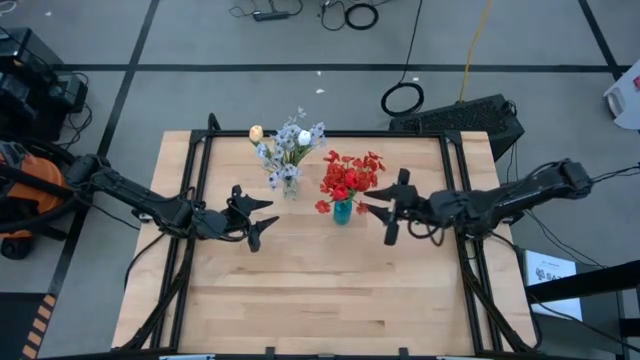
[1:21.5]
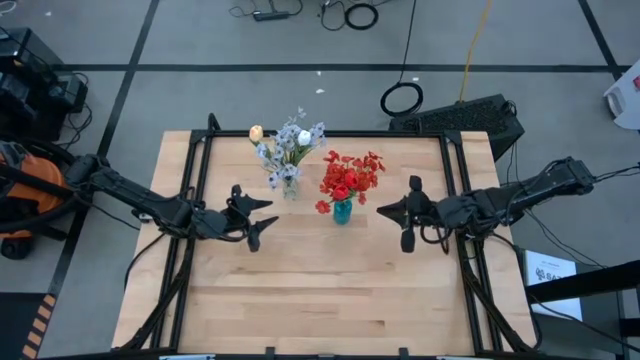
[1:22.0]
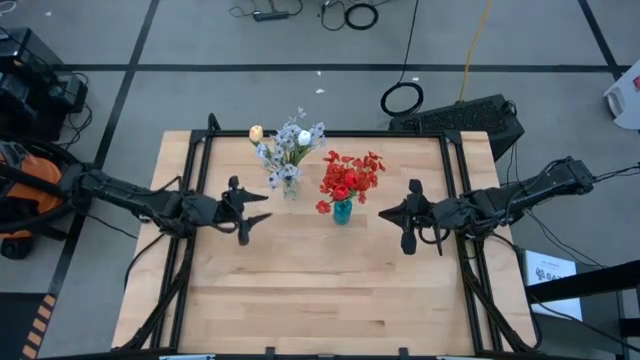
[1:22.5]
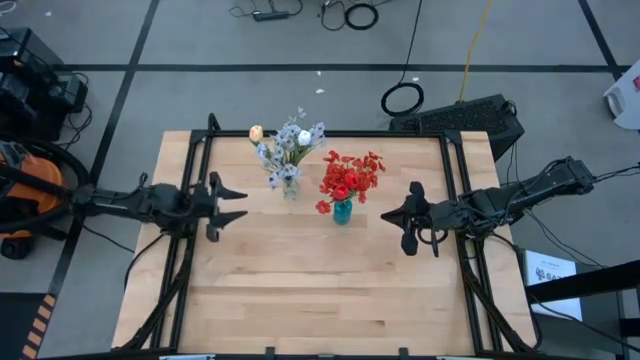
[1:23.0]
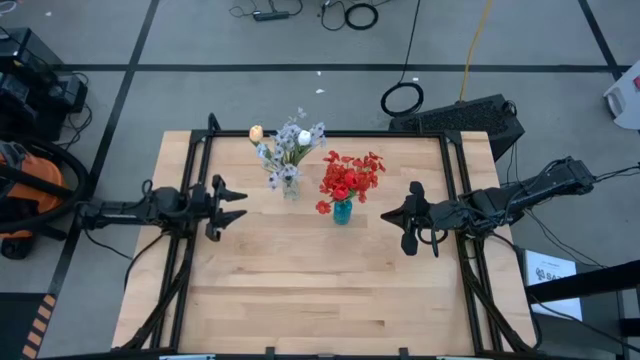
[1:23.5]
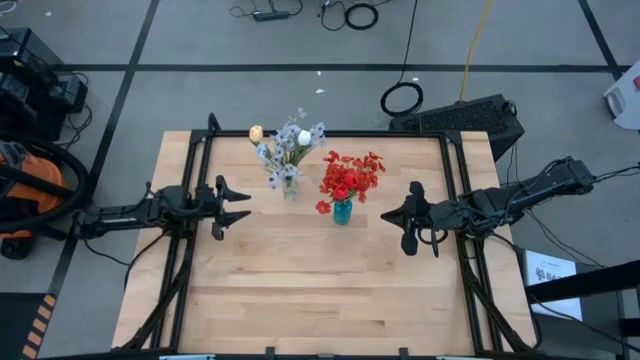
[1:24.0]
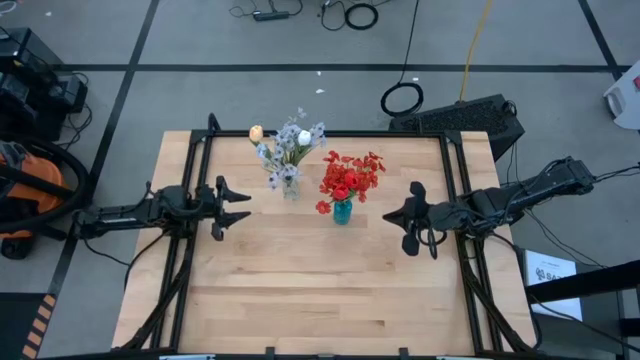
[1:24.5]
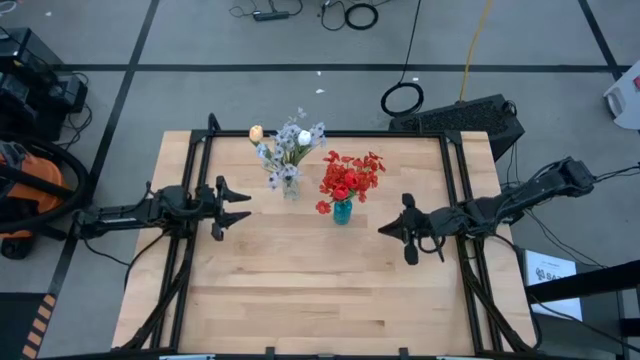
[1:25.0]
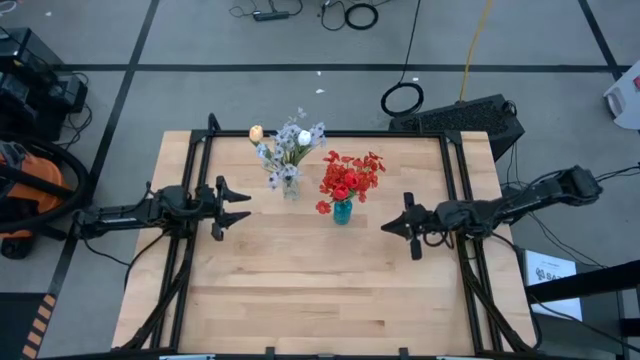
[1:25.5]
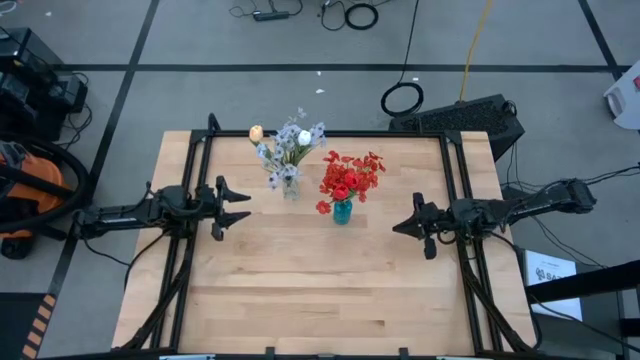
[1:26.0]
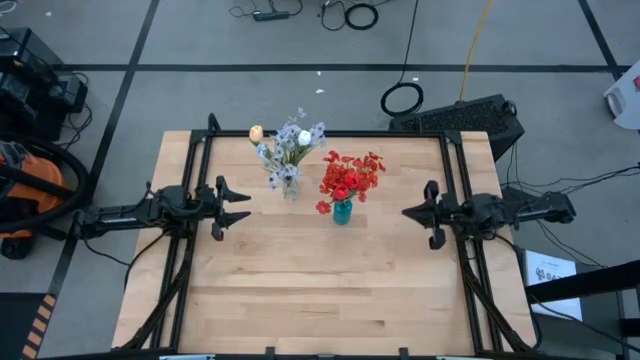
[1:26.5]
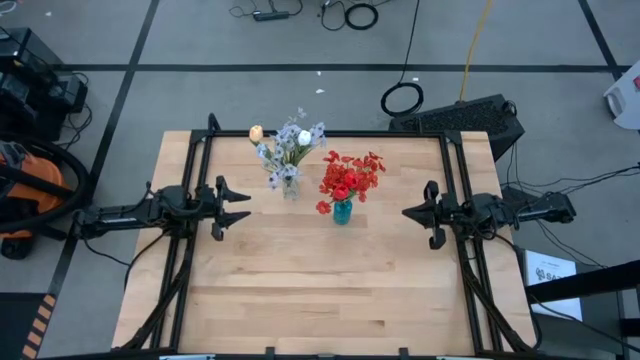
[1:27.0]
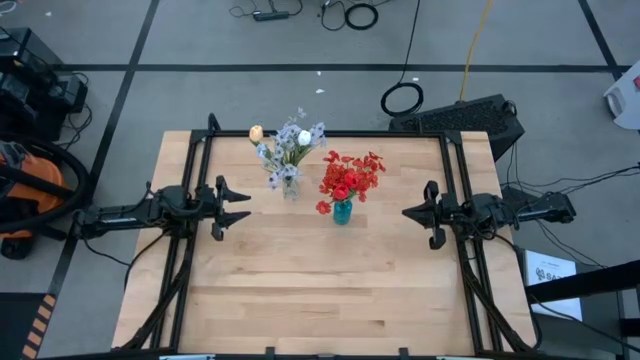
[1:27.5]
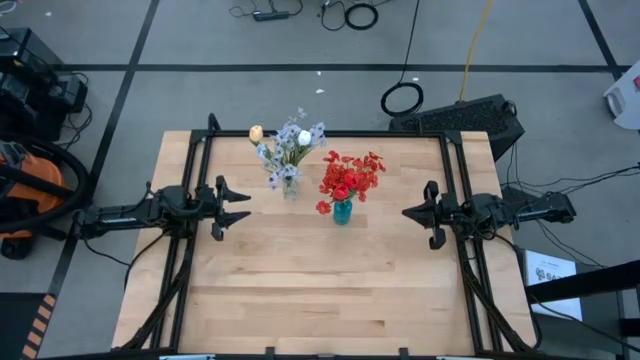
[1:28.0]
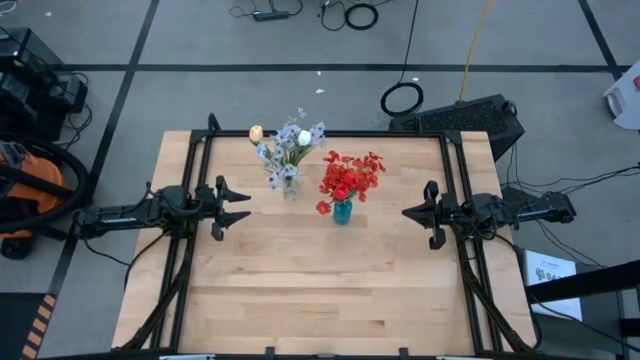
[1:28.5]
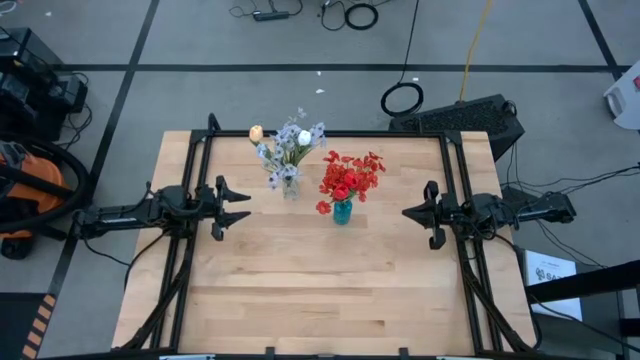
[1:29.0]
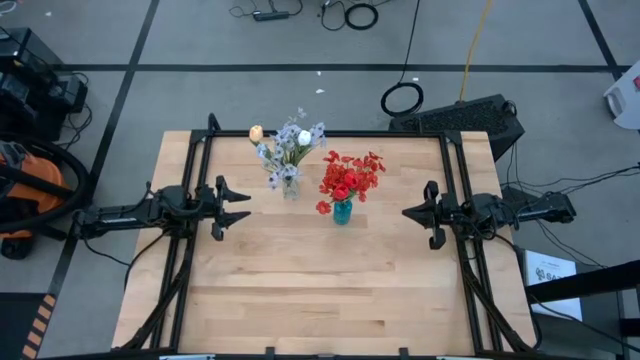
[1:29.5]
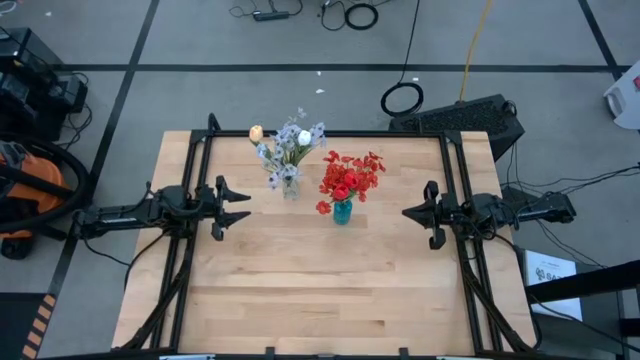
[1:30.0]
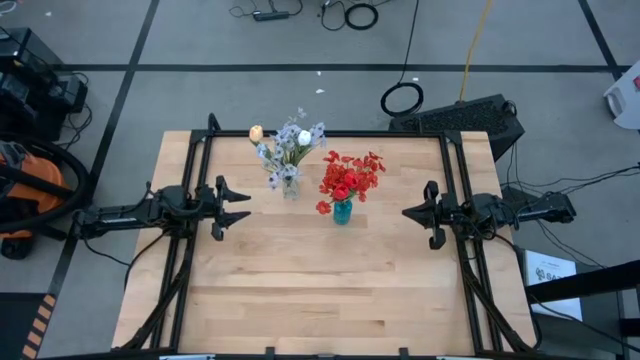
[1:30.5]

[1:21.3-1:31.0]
Task: Sort flowers into vase by color
Return to Home Position

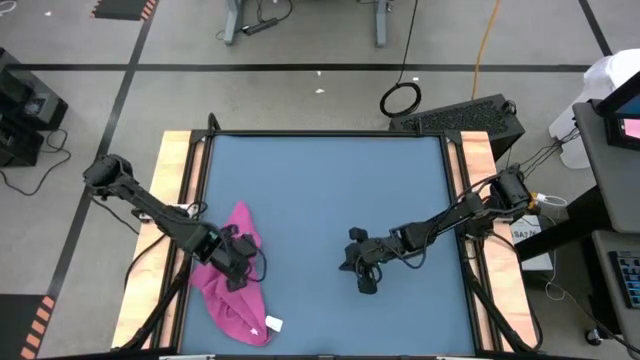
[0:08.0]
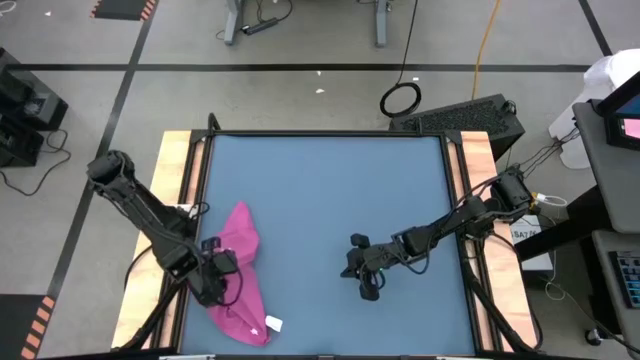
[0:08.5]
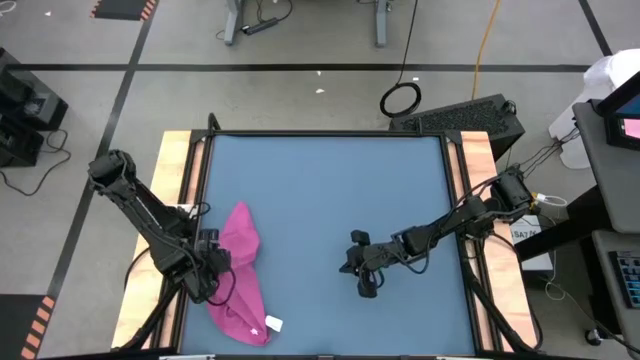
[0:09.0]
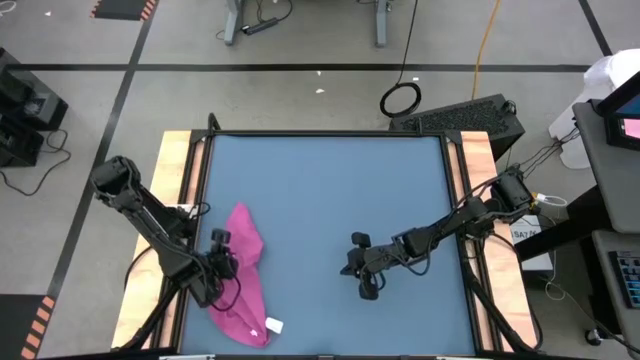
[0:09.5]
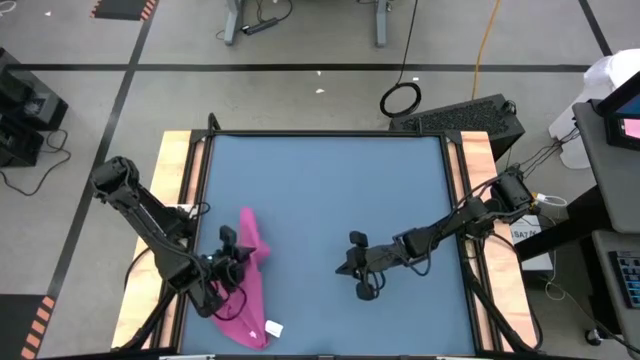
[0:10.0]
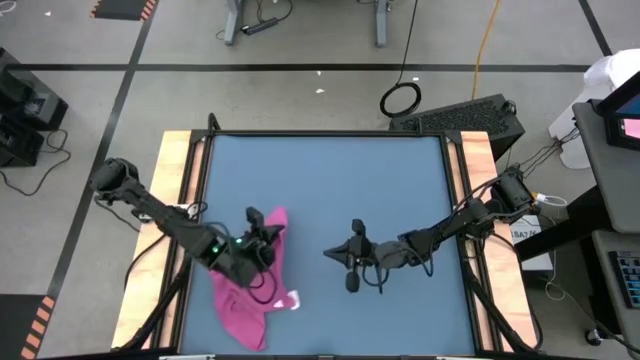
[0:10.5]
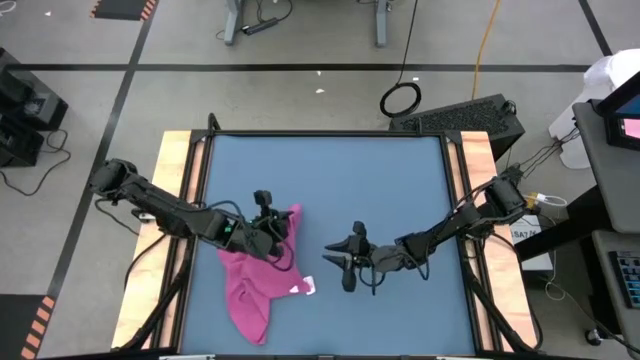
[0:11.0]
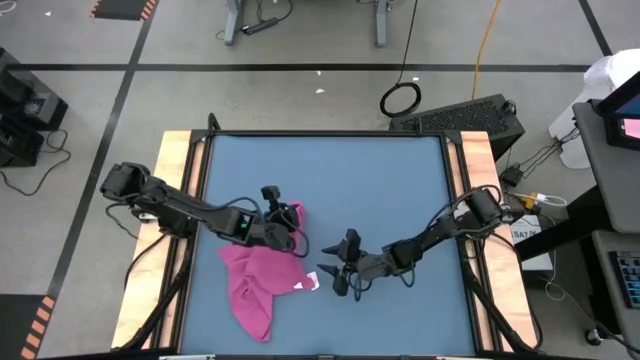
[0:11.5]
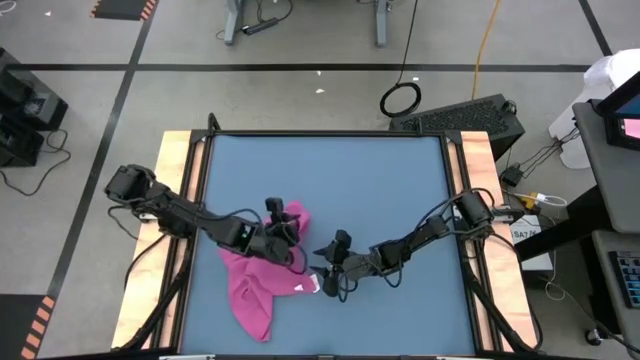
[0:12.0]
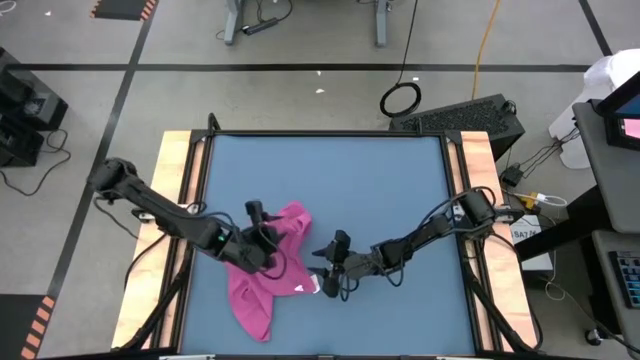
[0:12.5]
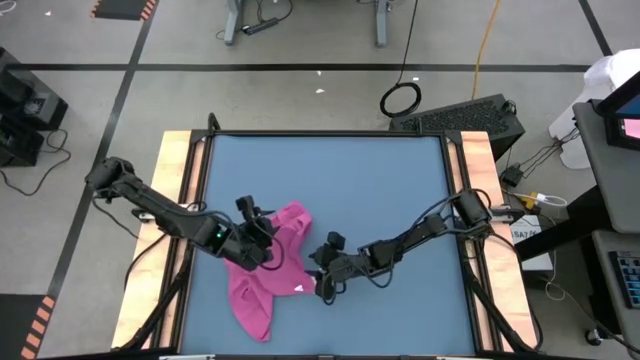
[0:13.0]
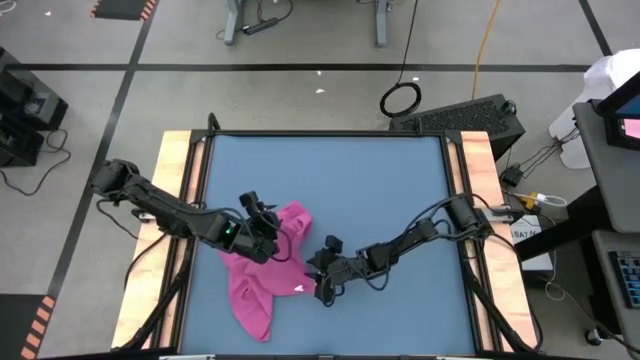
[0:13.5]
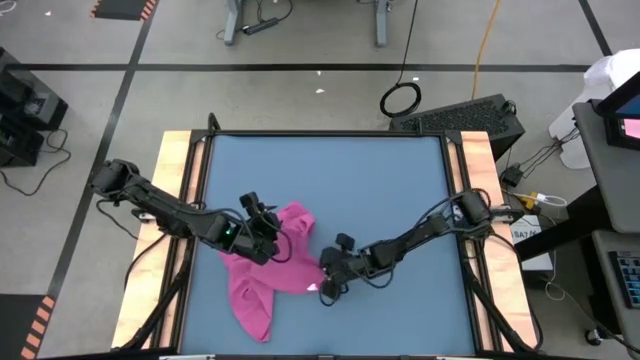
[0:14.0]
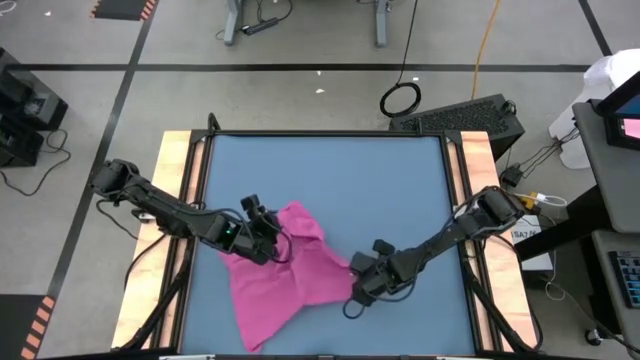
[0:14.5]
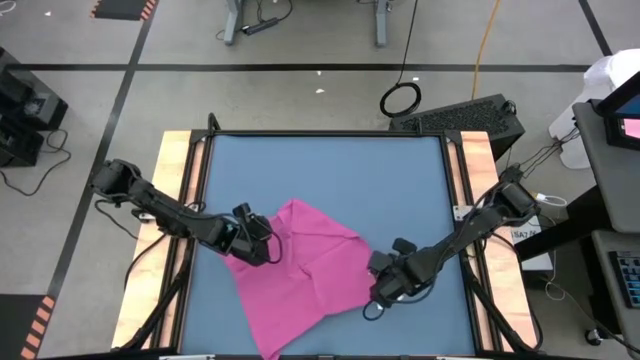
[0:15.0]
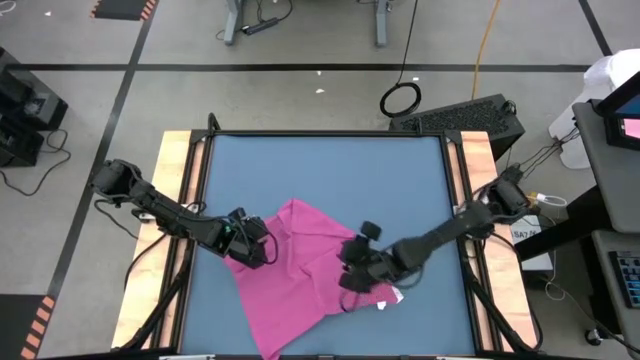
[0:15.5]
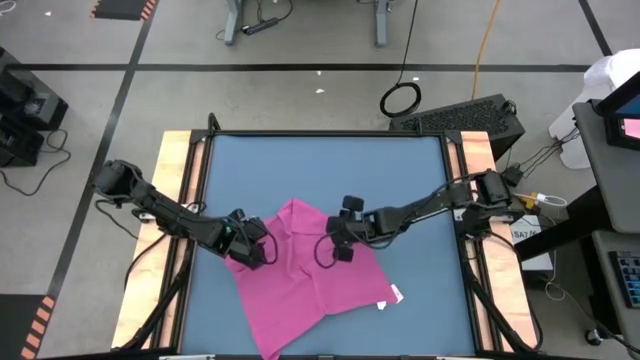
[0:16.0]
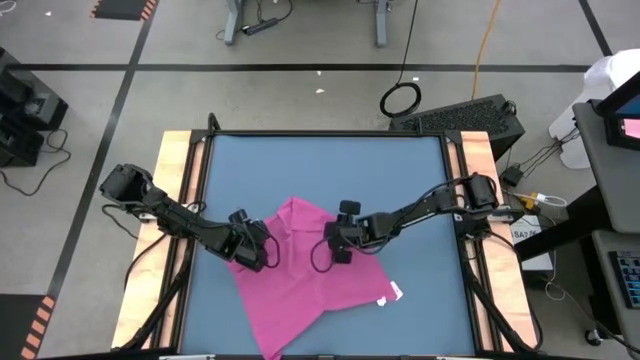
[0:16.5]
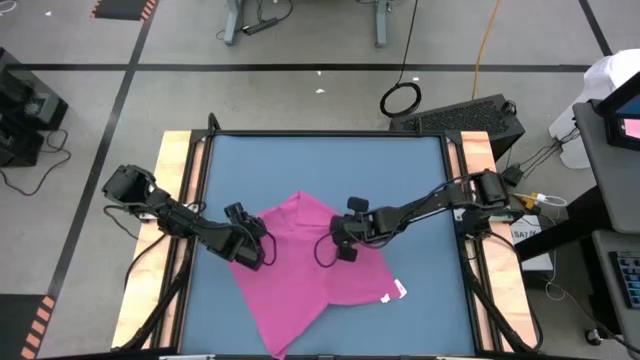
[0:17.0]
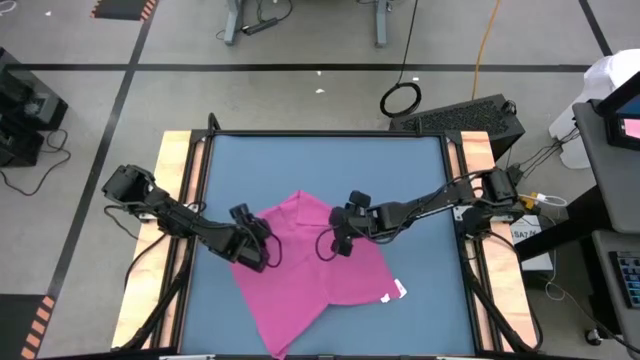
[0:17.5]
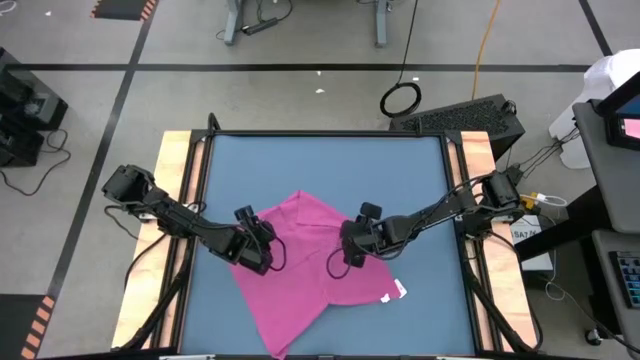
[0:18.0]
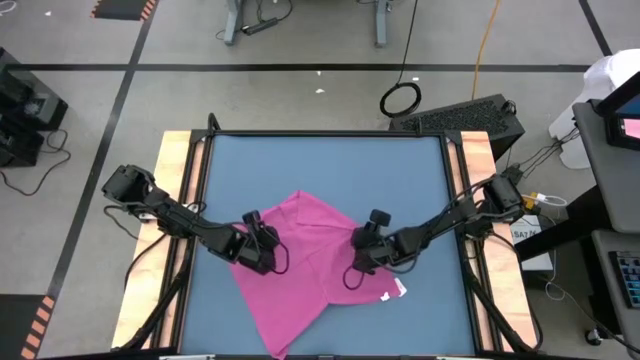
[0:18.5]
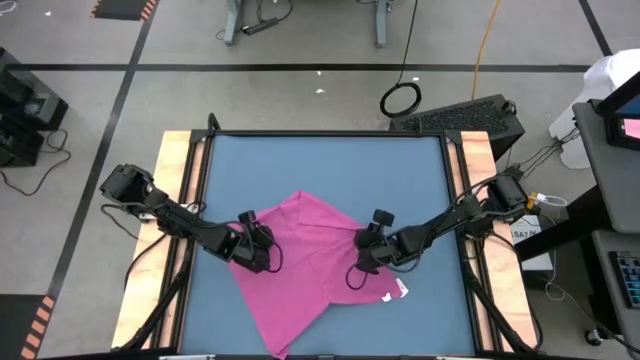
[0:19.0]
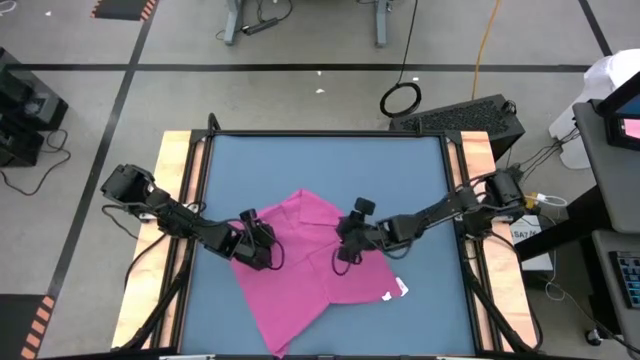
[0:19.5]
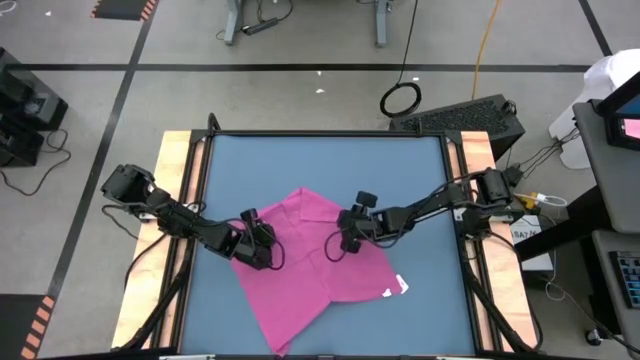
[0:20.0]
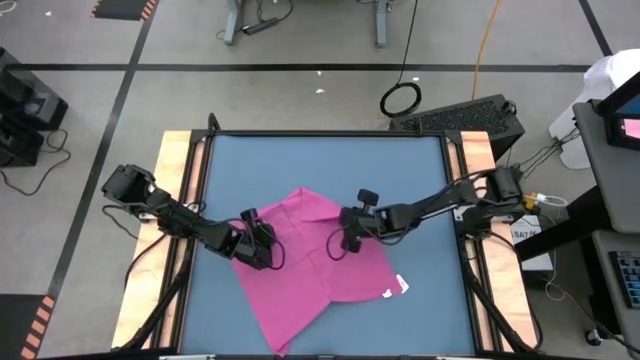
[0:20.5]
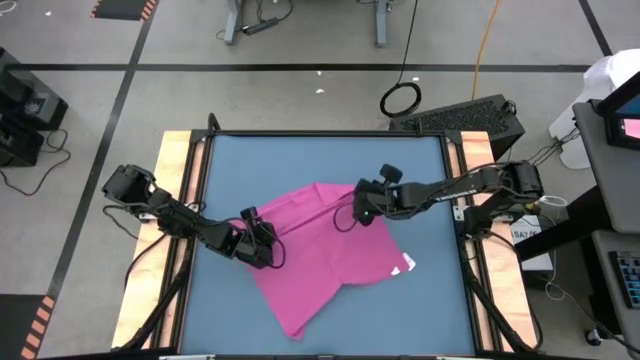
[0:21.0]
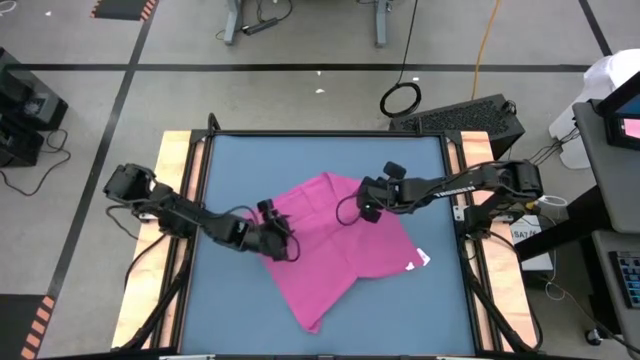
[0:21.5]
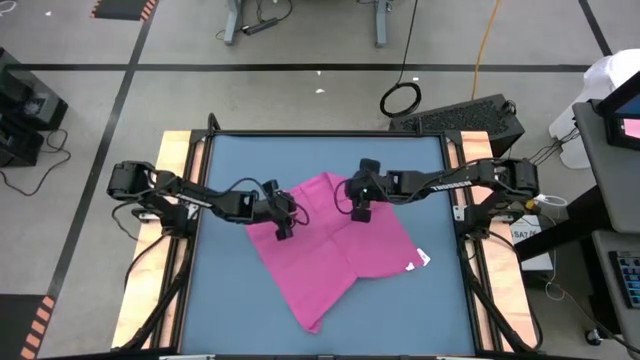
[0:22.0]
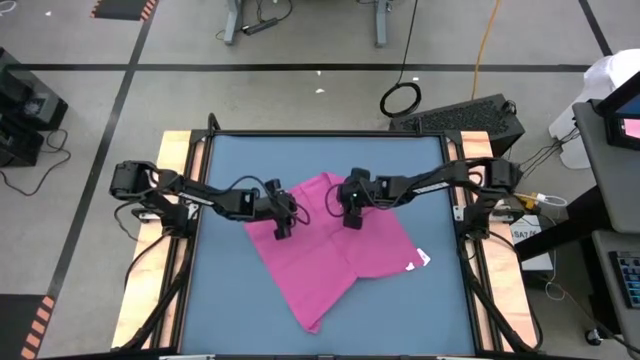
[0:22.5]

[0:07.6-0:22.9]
Task: Roll towel into tight, uniform cylinder
Fold the pink towel
